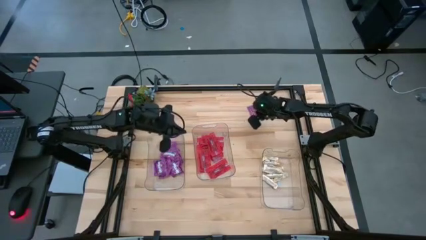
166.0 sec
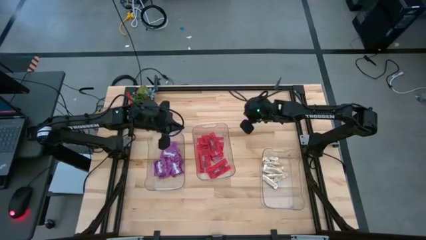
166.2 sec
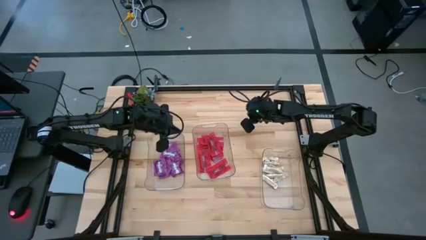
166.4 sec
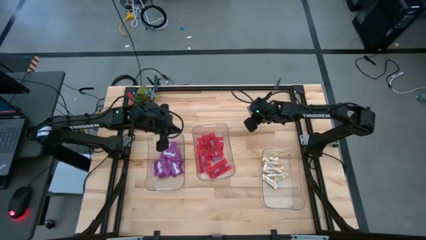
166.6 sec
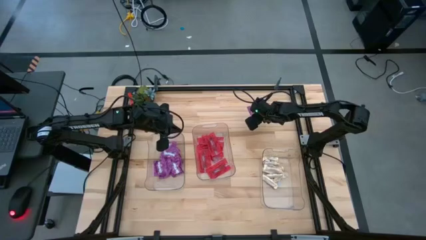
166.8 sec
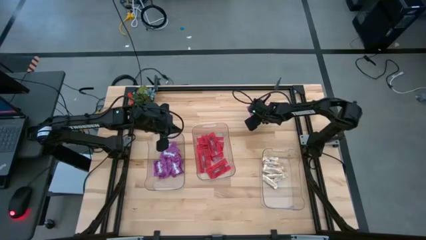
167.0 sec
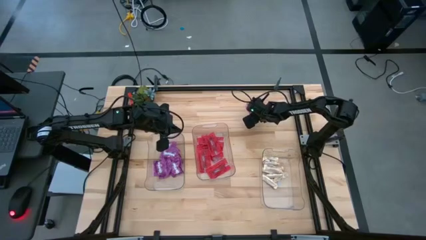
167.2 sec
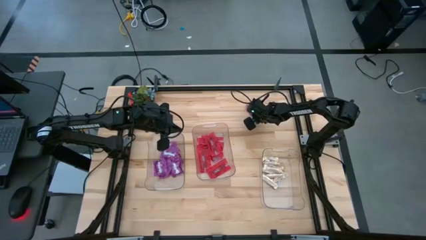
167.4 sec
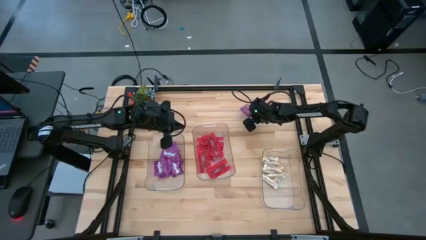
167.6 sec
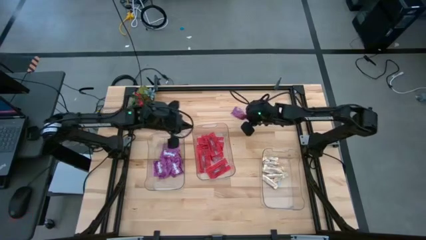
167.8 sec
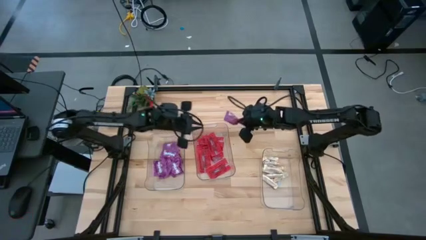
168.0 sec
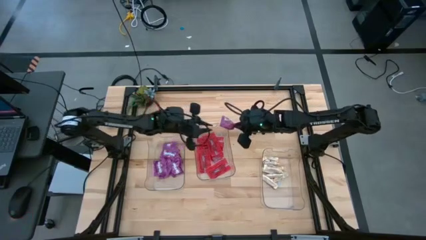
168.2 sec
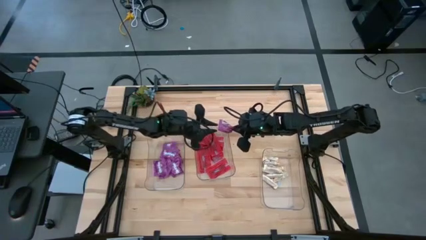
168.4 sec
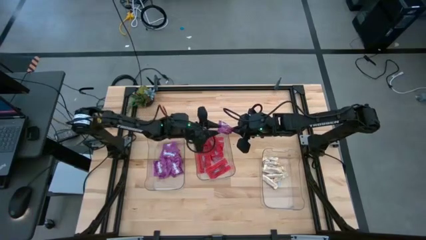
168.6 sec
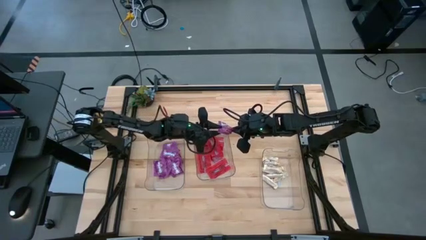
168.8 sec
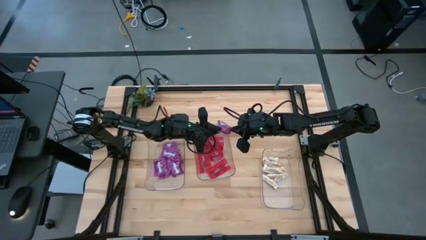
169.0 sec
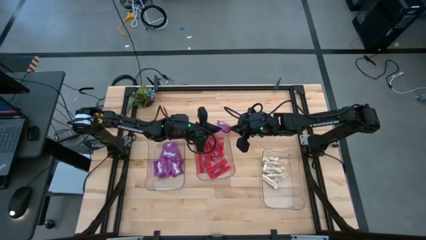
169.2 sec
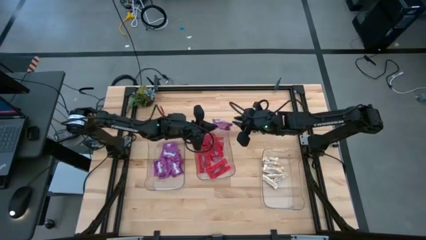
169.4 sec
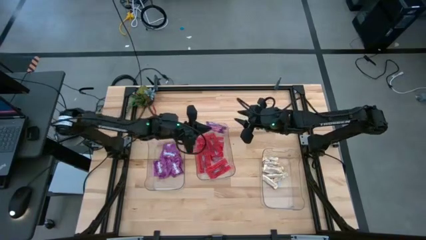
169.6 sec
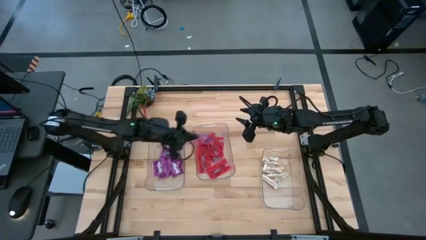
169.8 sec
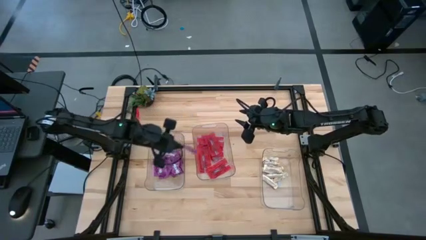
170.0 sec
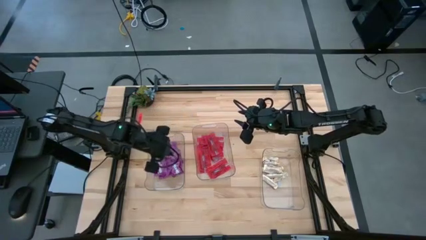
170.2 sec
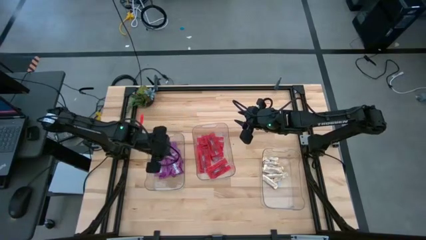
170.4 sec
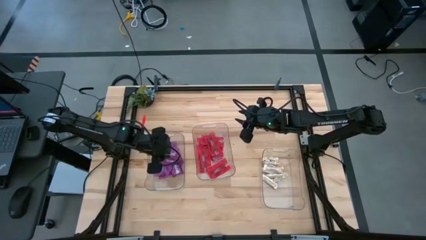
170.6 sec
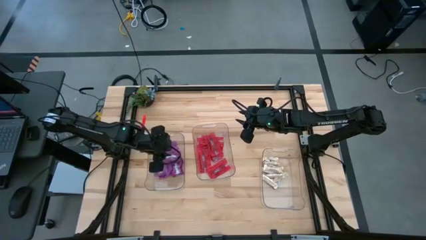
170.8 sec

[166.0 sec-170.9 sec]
Task: Sort candy
Put the violet candy pack into the left transparent bin

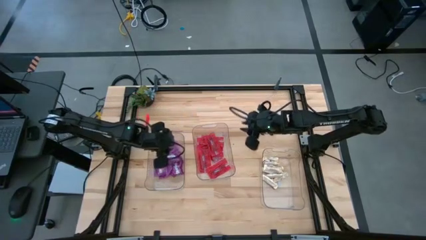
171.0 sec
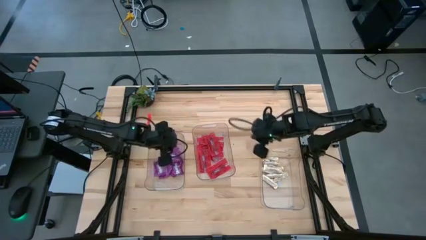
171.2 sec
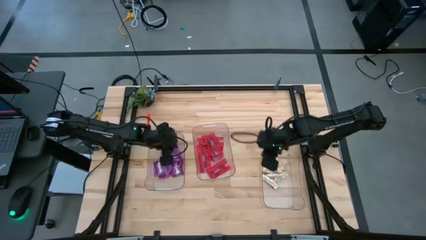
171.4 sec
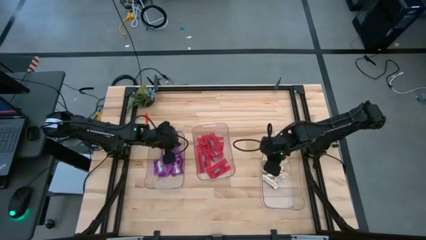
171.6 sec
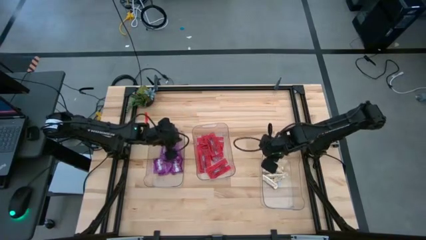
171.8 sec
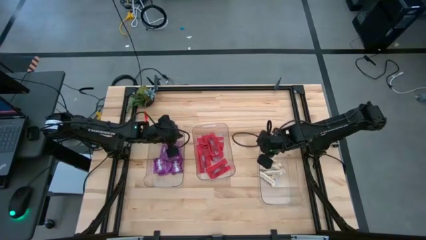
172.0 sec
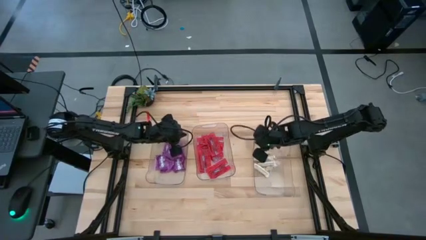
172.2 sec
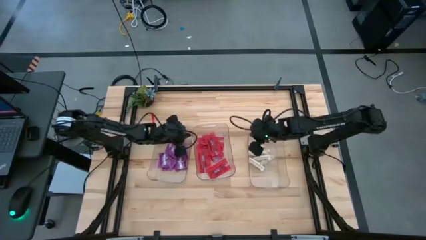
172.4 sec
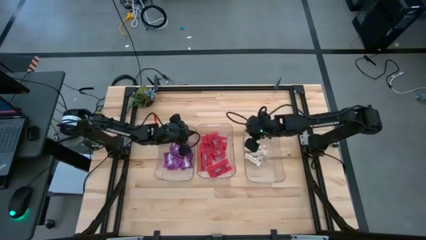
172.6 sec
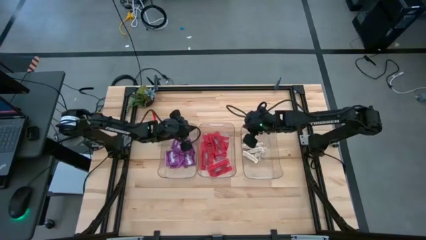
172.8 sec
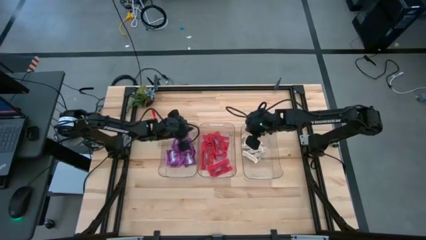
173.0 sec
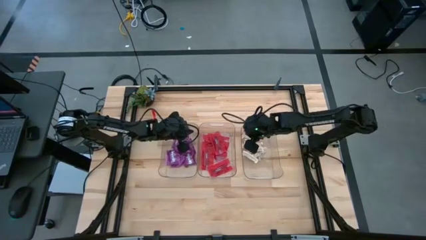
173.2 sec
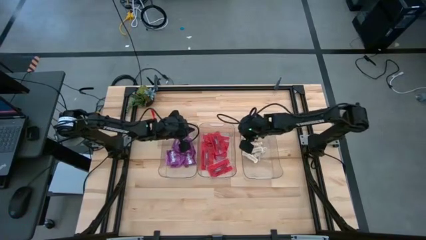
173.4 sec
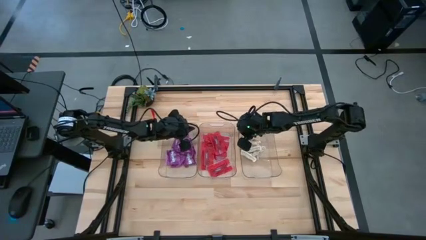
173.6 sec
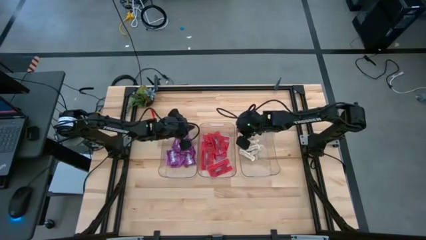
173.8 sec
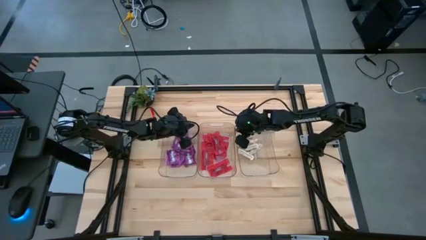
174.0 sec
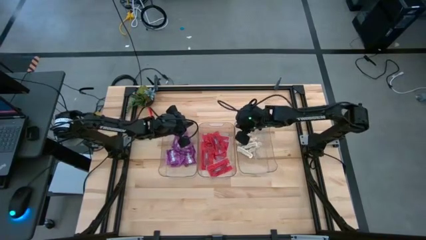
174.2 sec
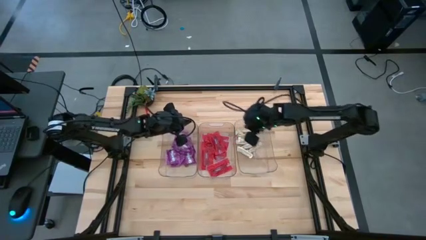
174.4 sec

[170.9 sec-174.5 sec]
Adjust the transparent bins to the center

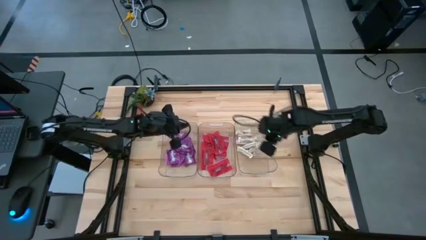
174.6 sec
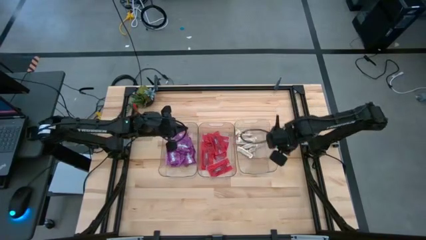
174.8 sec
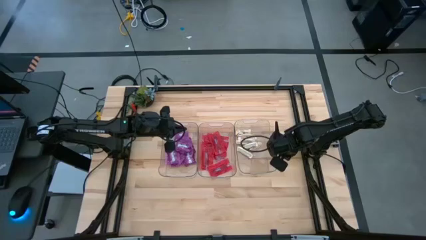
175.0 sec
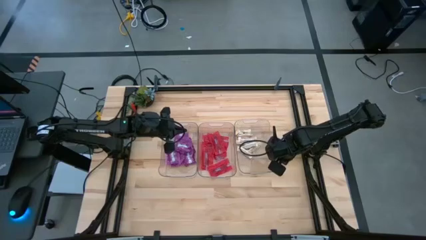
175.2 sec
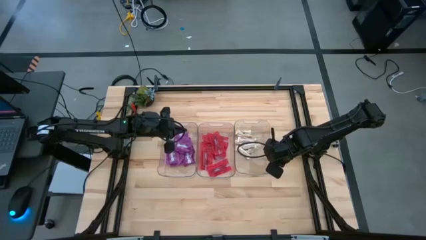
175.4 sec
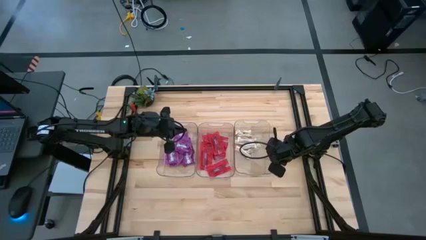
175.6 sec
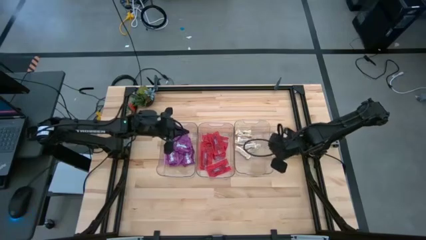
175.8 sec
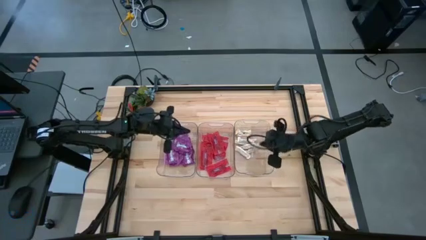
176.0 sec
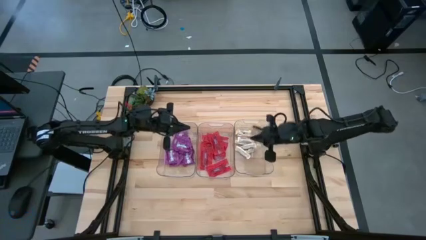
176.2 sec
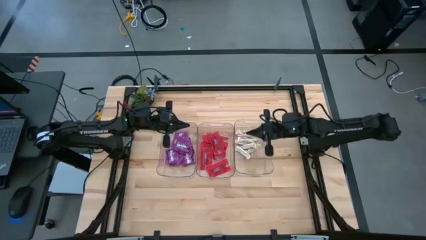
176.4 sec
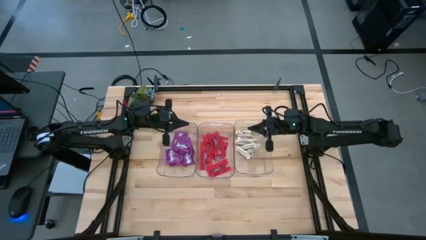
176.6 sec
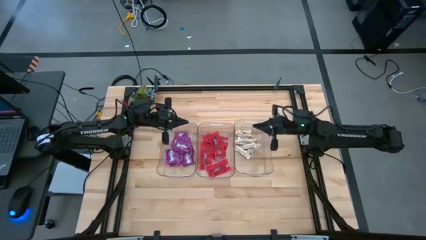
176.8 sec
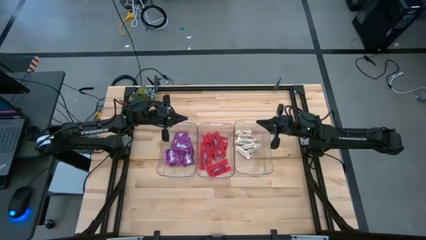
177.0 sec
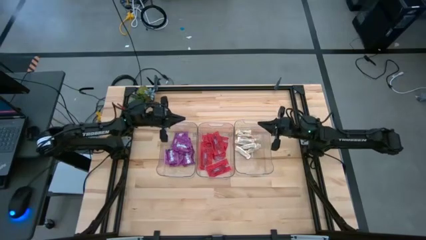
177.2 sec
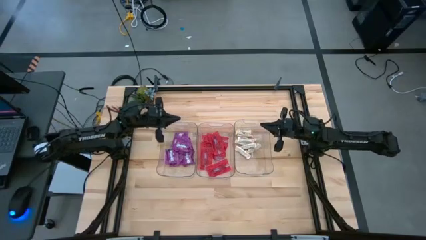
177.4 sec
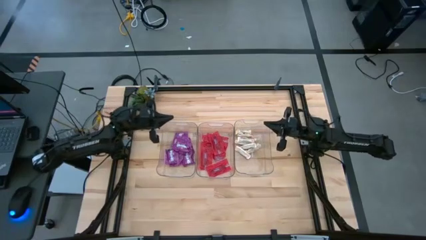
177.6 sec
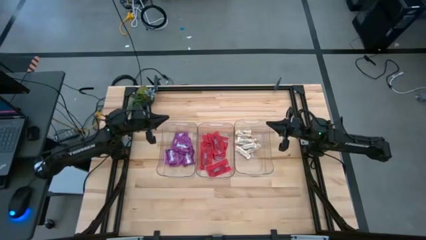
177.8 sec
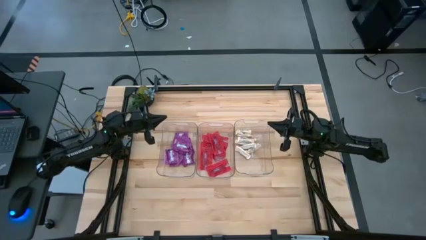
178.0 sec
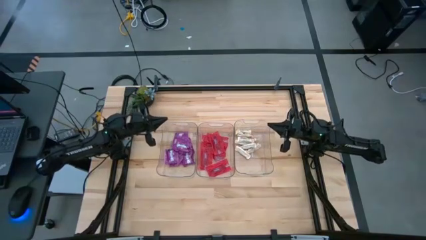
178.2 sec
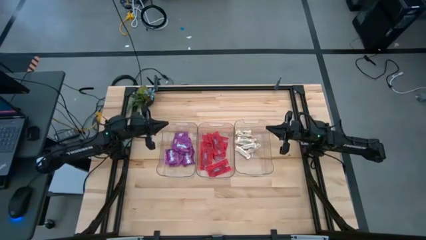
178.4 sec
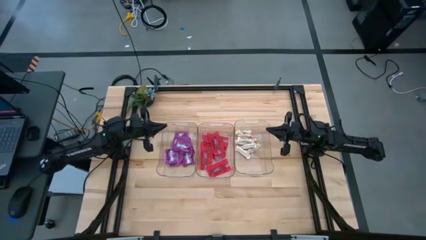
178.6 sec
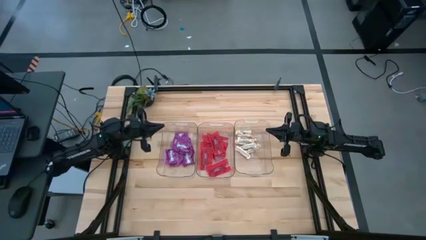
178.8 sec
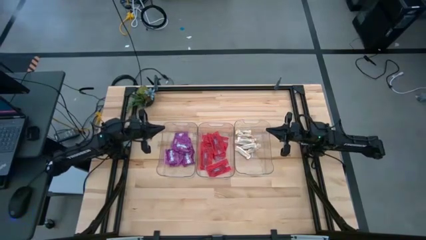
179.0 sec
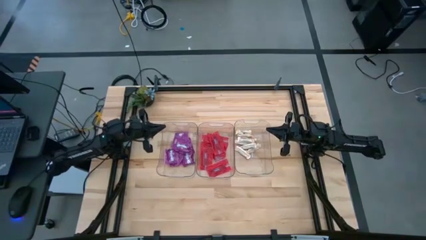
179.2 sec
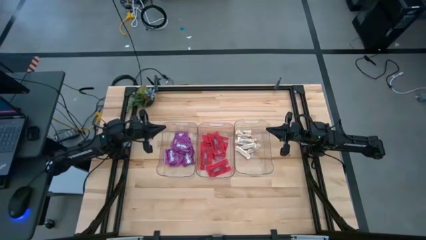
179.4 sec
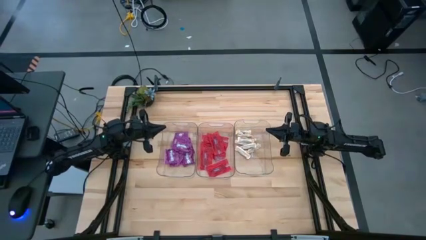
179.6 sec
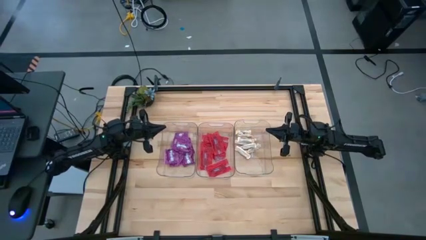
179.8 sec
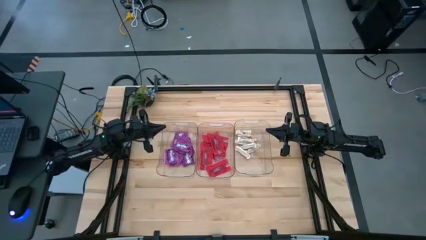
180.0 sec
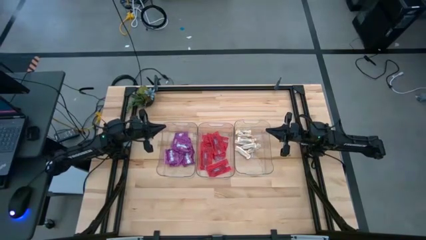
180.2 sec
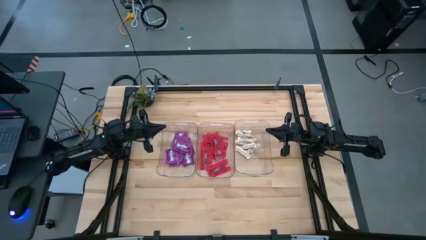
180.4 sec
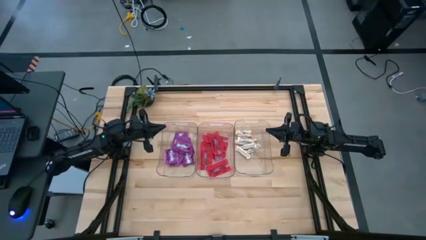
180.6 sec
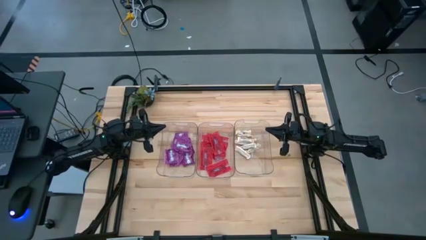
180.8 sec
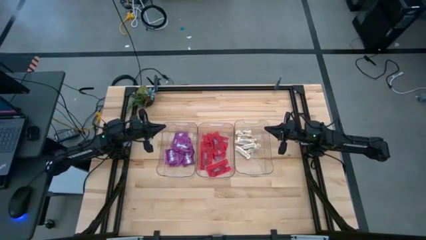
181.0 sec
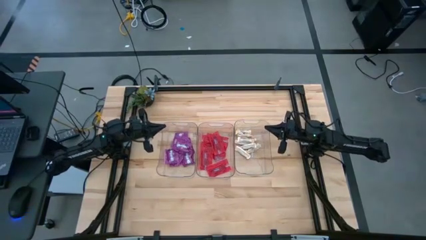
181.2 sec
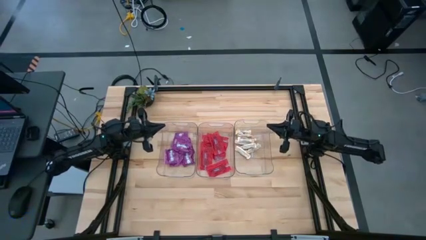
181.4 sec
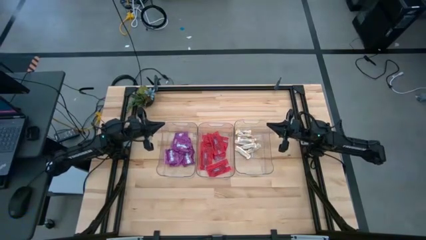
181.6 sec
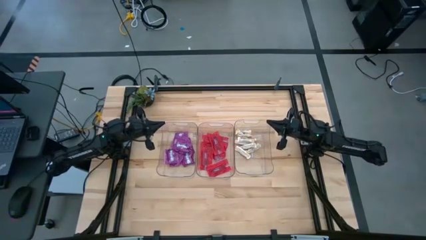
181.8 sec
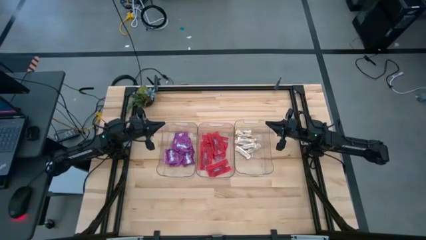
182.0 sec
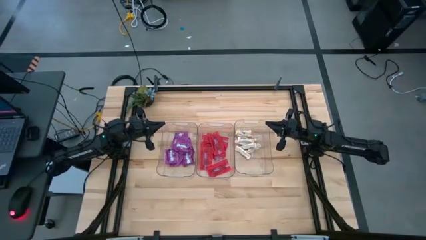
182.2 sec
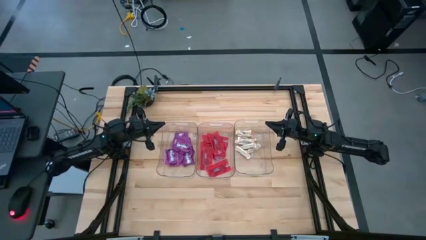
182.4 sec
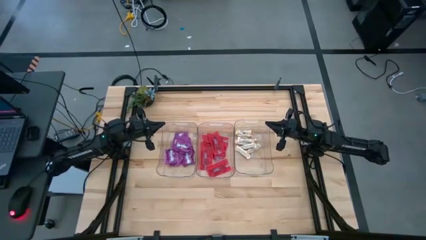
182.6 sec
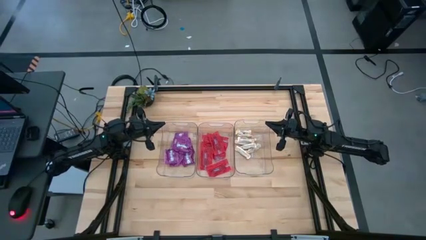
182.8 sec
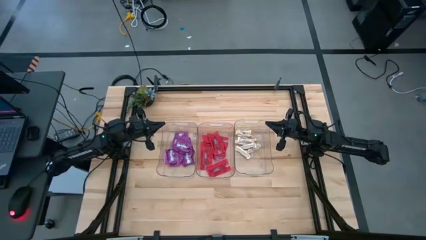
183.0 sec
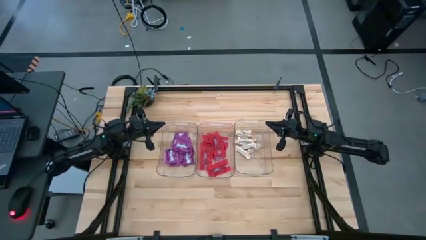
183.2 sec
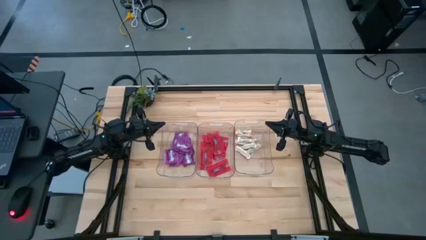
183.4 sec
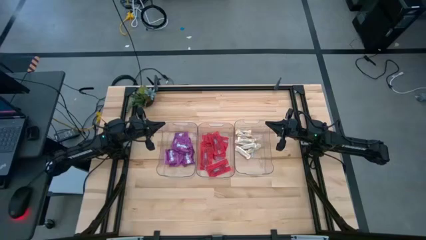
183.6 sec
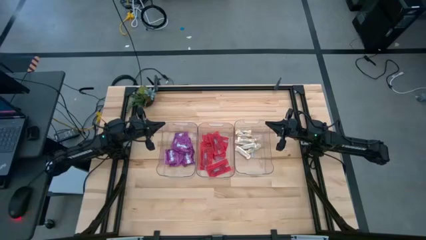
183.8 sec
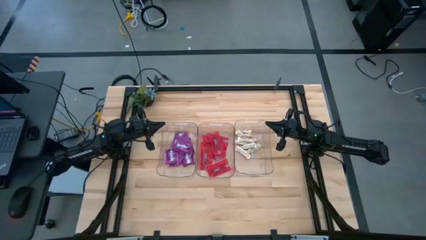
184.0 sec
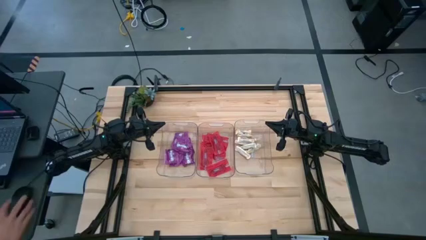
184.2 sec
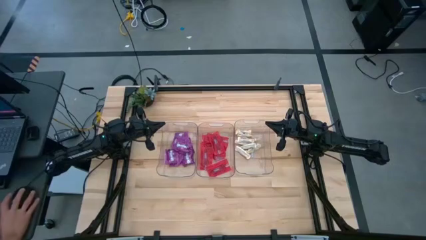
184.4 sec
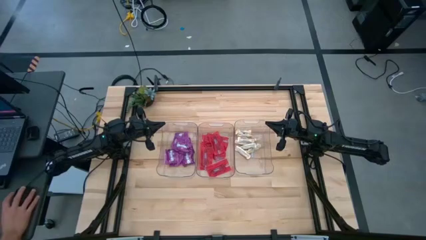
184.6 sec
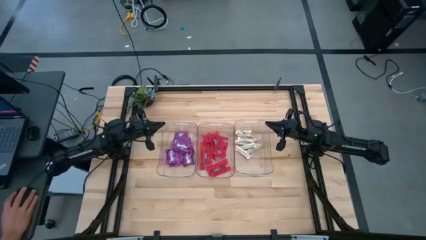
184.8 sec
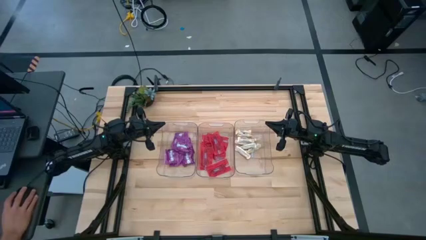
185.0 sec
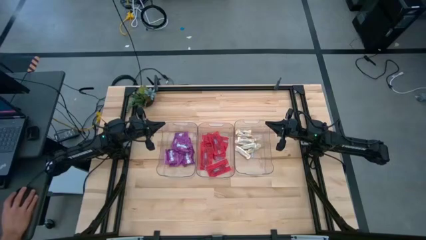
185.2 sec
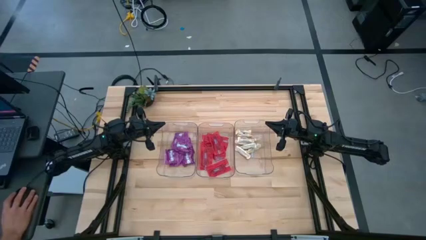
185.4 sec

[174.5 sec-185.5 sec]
Return to Home Position
